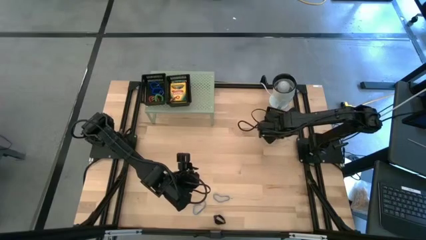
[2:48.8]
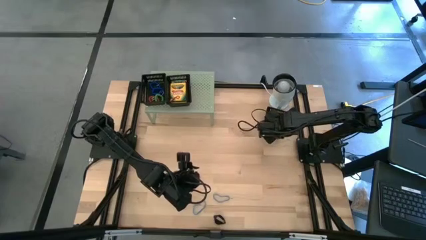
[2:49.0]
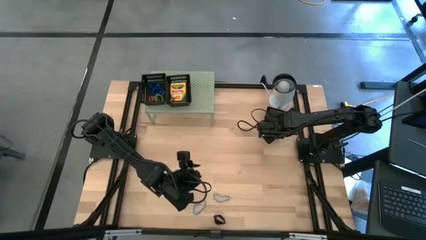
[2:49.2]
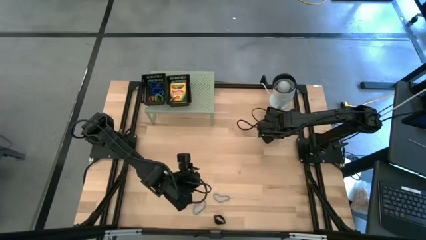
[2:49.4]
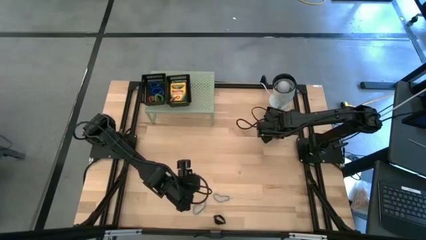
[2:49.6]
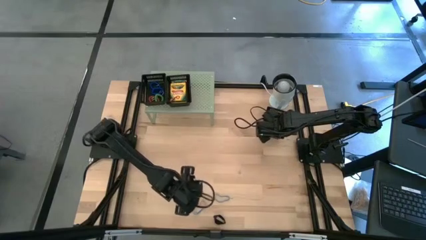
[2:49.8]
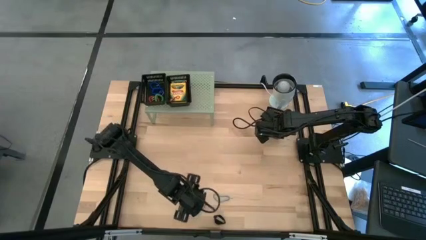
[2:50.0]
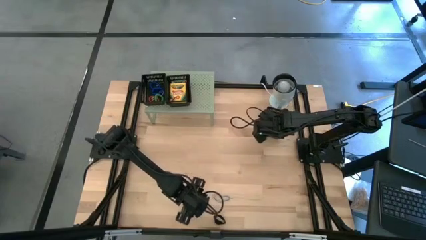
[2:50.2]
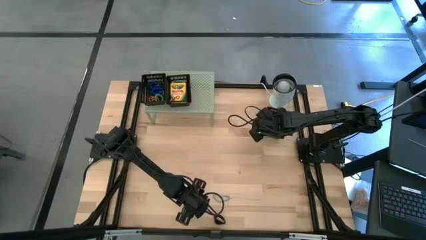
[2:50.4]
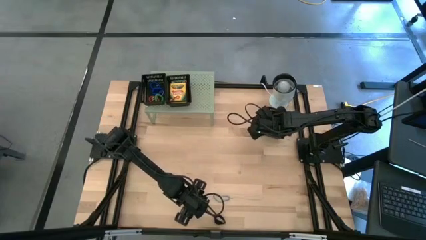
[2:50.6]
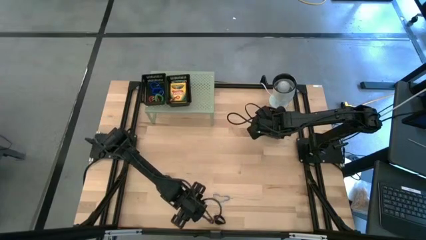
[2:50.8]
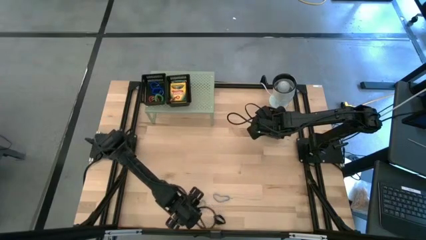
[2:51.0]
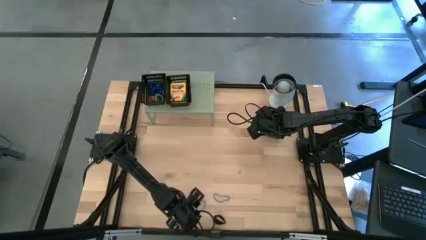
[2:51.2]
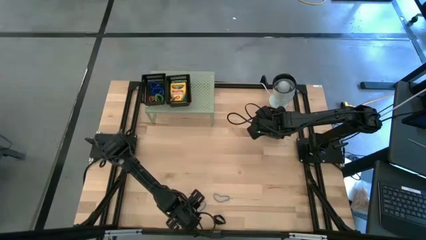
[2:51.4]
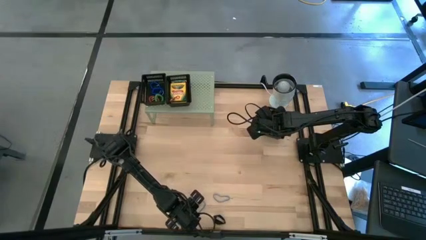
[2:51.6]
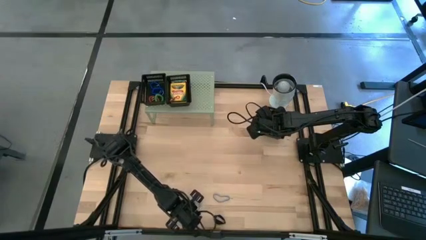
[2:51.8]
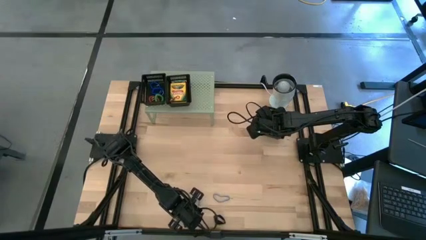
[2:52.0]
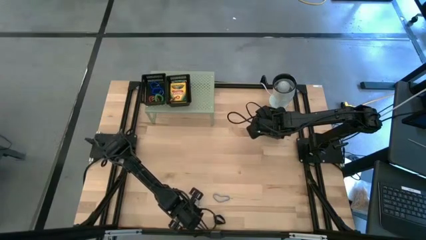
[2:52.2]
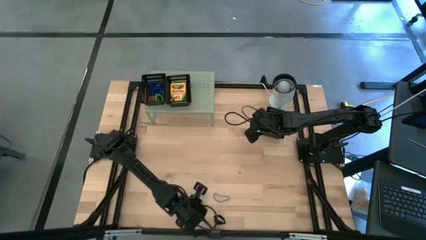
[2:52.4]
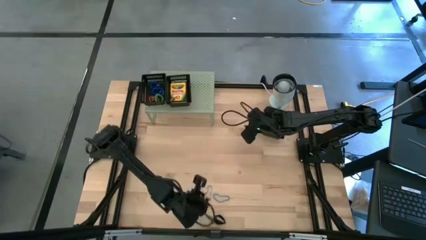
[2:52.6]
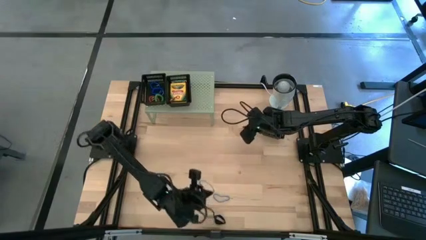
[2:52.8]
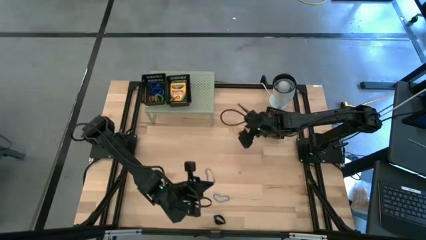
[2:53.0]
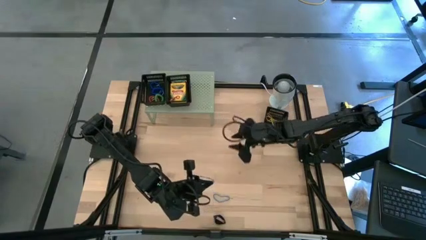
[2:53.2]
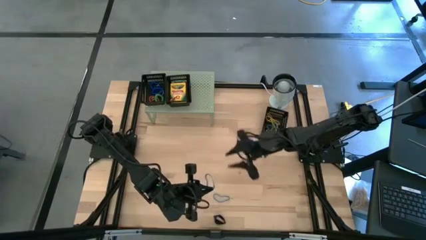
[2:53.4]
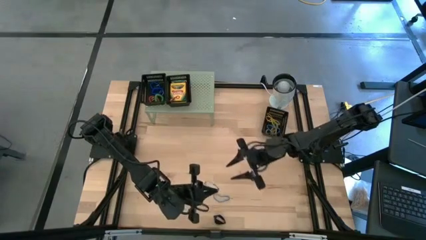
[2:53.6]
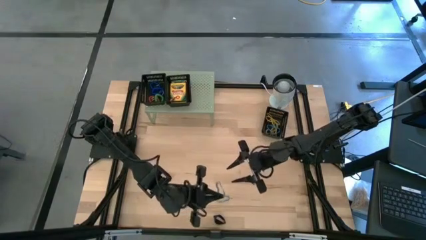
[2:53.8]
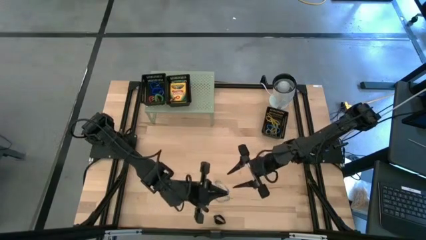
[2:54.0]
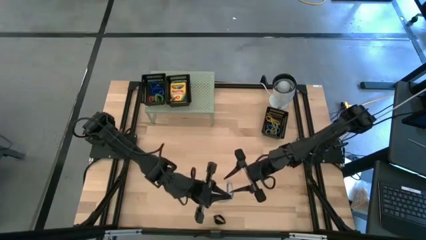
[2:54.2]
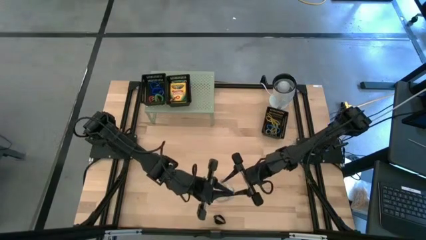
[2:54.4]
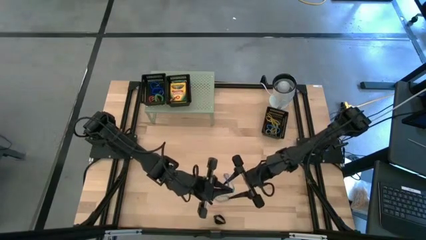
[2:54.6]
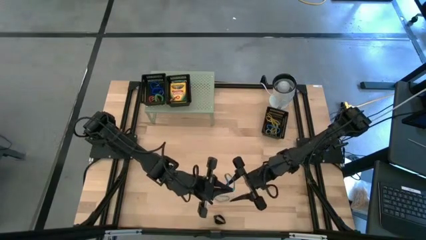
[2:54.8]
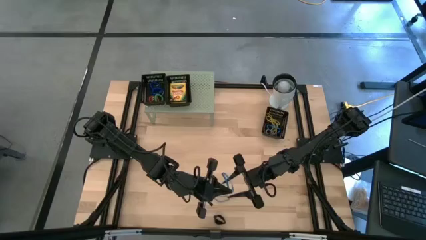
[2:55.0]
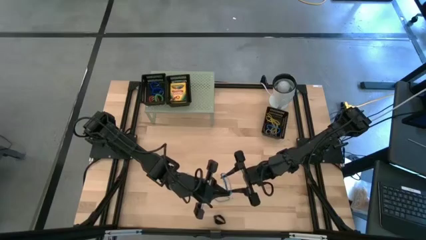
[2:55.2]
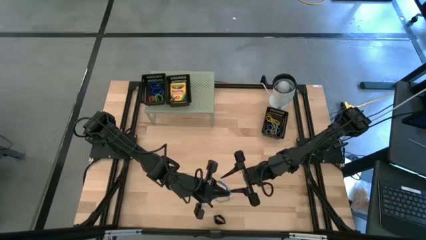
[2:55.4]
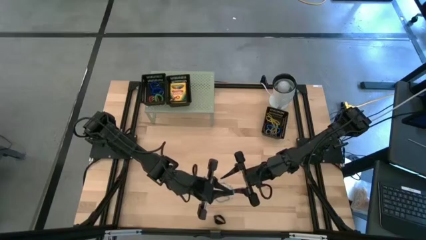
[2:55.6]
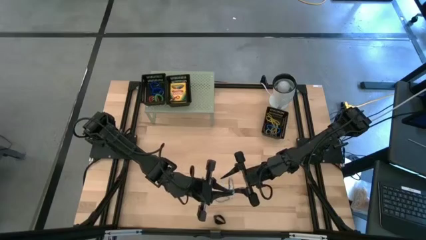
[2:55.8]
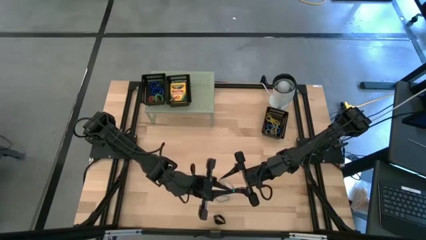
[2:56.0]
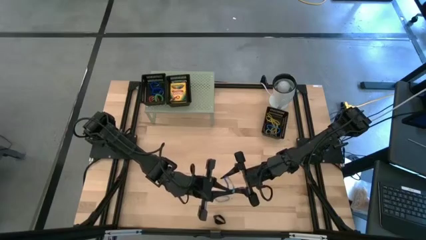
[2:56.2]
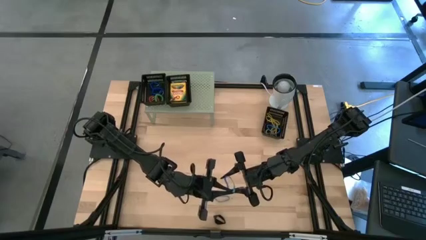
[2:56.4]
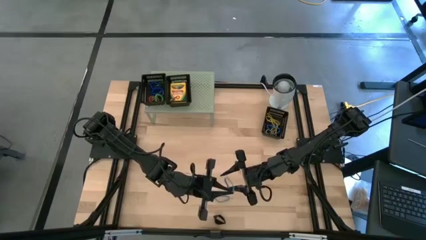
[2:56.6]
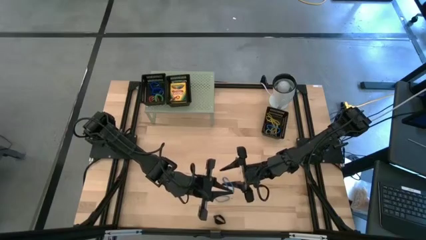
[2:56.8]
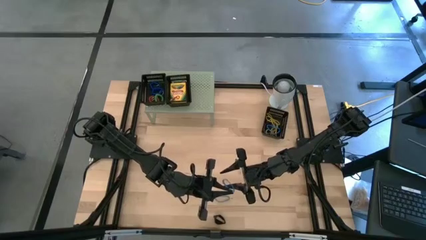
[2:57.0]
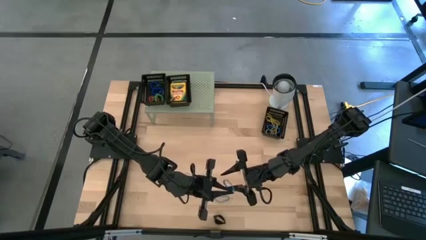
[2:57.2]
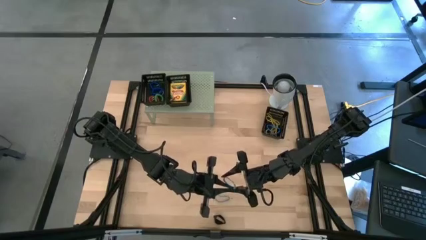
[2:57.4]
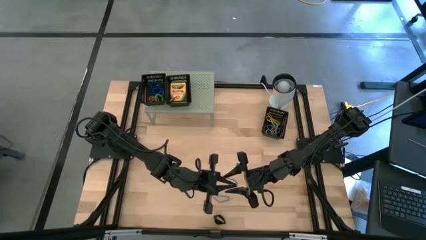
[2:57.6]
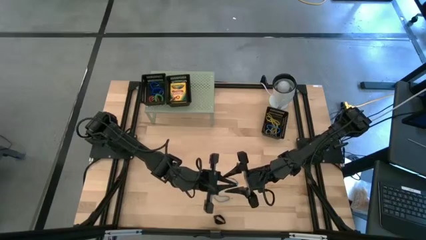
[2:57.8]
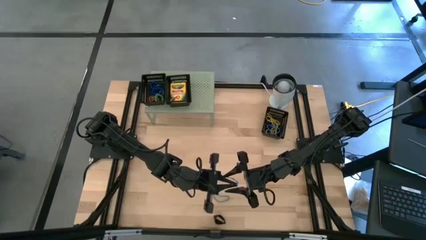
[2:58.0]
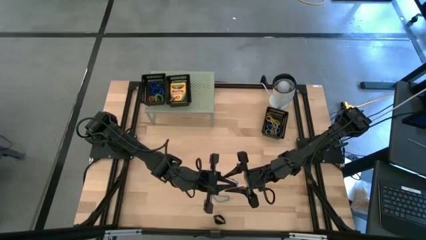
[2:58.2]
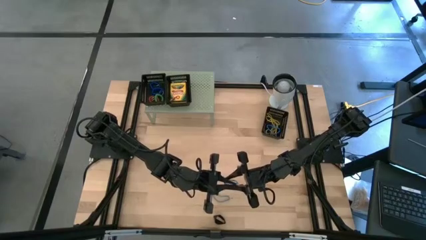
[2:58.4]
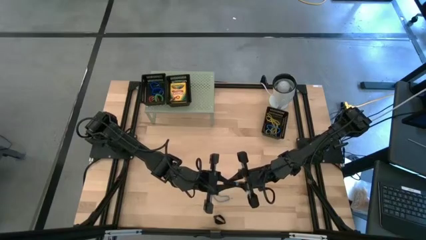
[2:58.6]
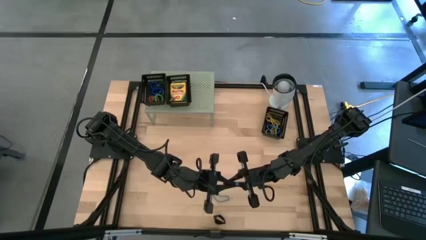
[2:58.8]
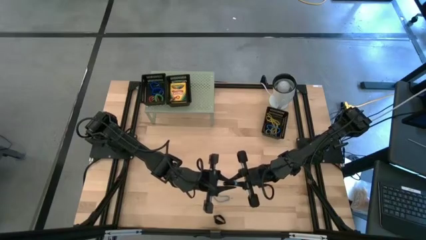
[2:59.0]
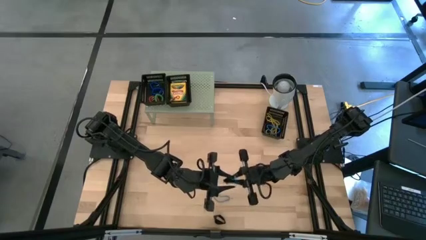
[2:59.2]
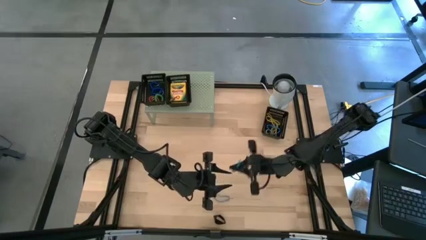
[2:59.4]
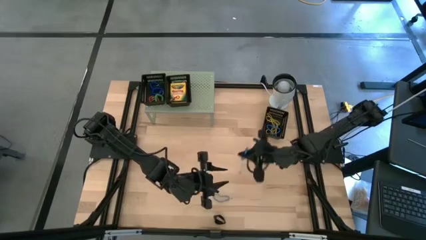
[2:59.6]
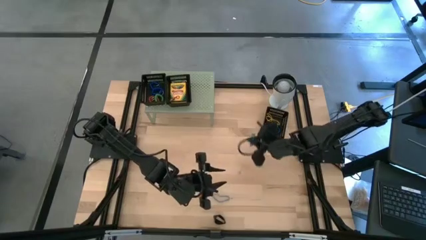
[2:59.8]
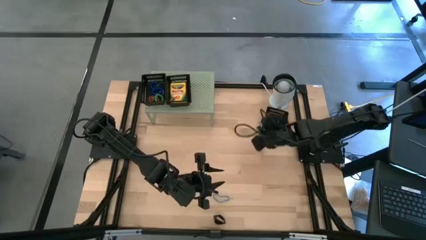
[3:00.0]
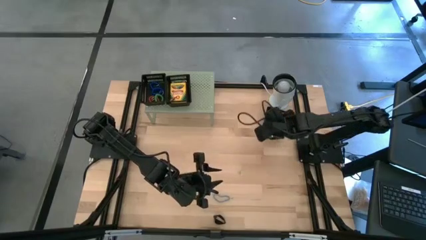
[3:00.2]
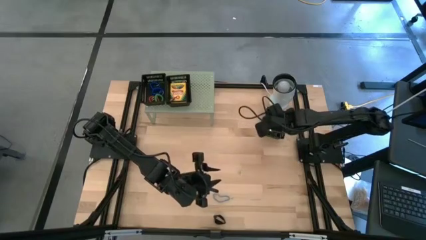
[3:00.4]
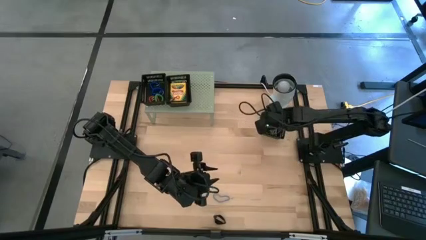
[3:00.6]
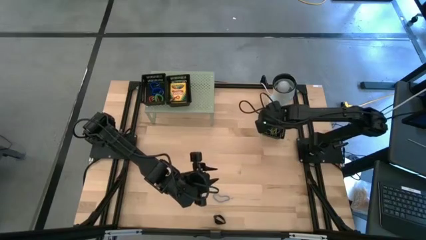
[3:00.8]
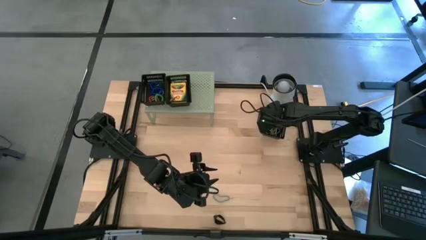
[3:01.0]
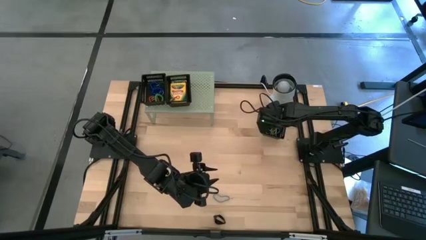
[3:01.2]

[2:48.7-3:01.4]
Task: Pick & Place Office Desk Supplies
Put the blue rubber band into the black bin
